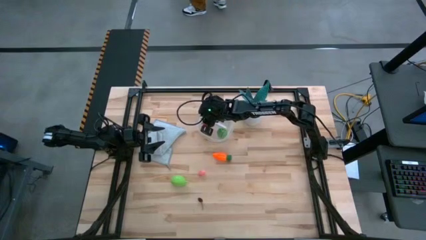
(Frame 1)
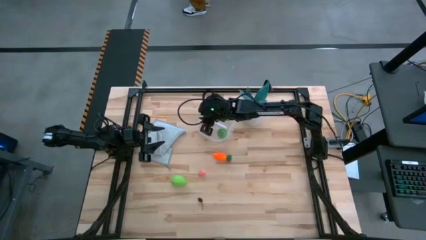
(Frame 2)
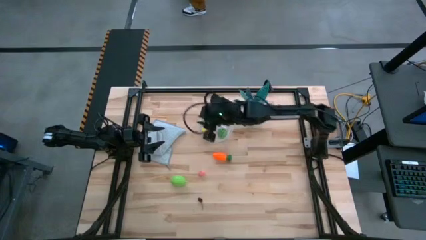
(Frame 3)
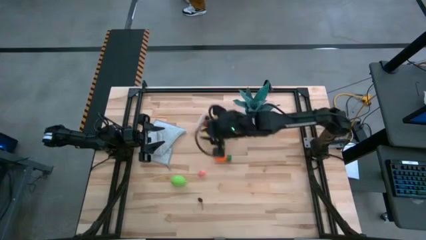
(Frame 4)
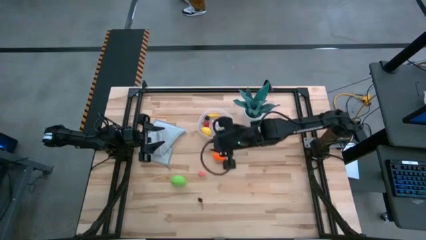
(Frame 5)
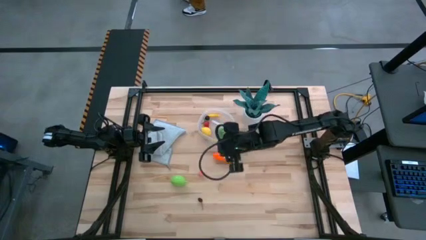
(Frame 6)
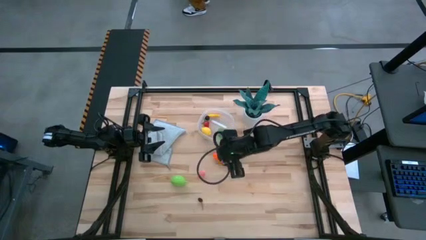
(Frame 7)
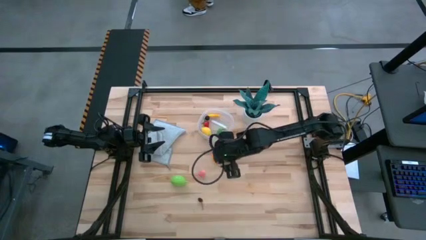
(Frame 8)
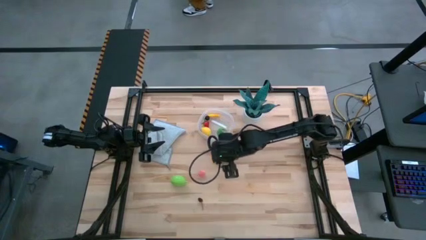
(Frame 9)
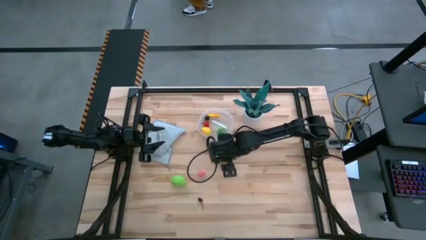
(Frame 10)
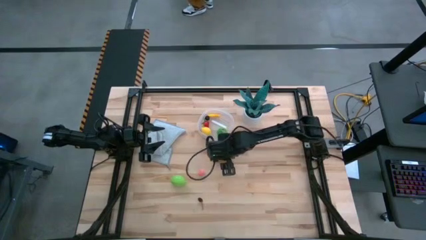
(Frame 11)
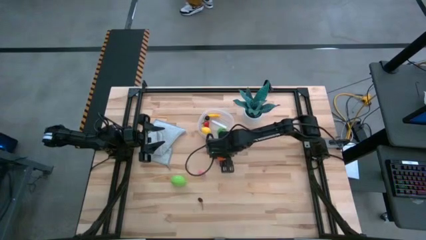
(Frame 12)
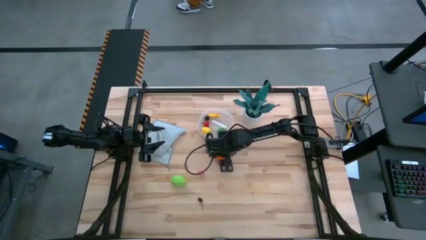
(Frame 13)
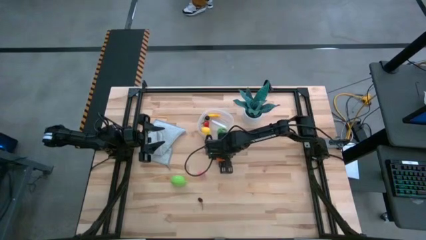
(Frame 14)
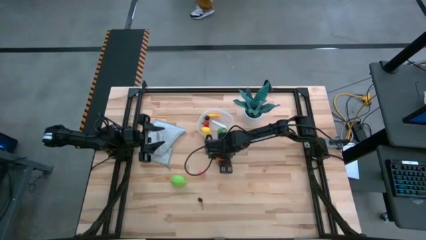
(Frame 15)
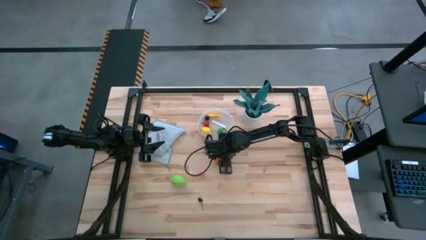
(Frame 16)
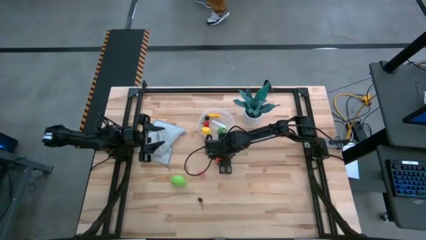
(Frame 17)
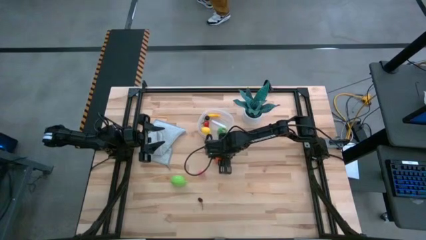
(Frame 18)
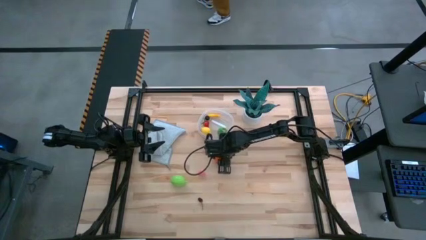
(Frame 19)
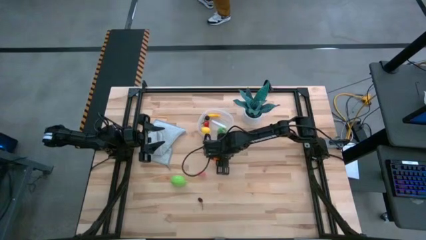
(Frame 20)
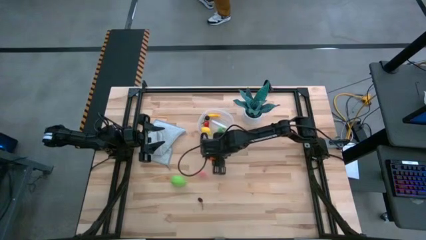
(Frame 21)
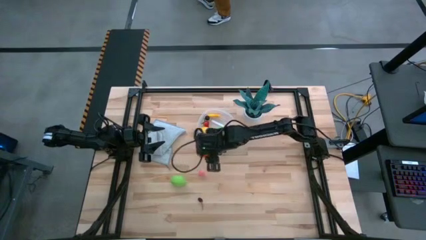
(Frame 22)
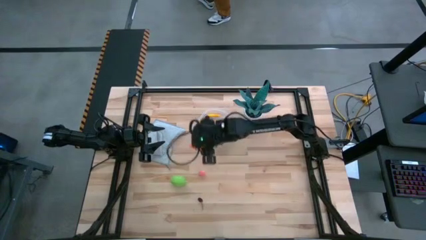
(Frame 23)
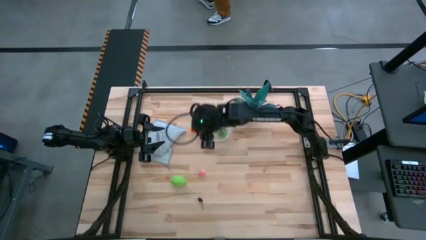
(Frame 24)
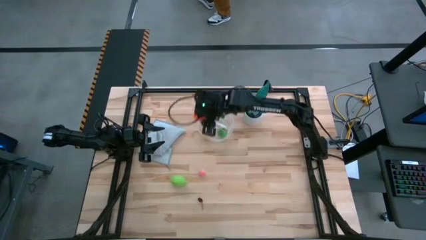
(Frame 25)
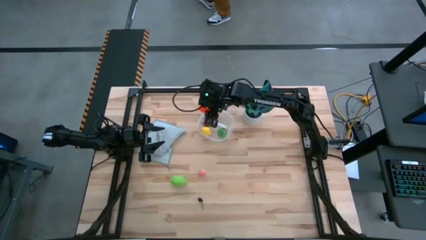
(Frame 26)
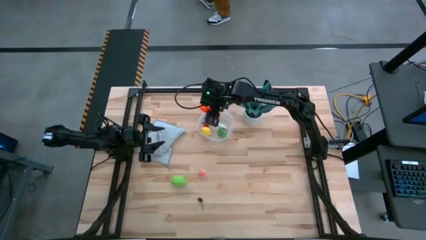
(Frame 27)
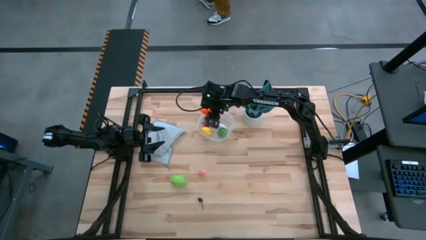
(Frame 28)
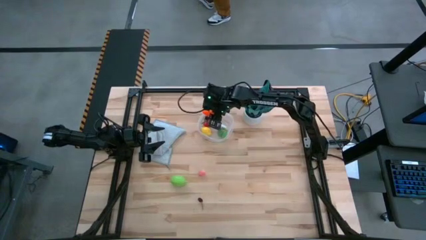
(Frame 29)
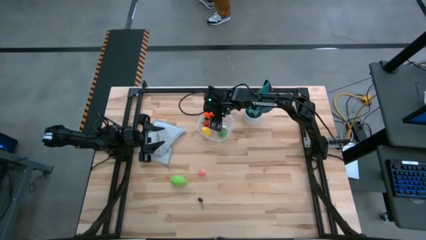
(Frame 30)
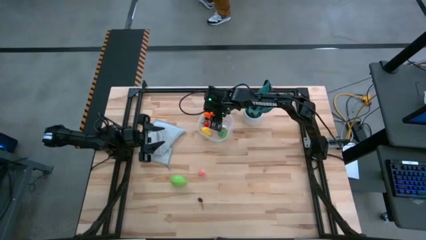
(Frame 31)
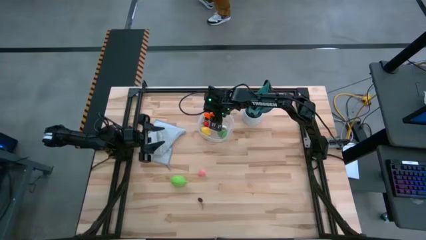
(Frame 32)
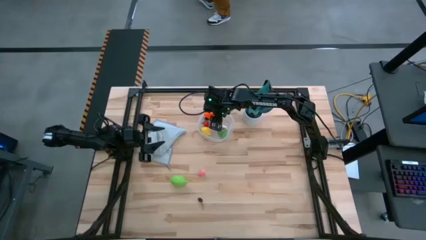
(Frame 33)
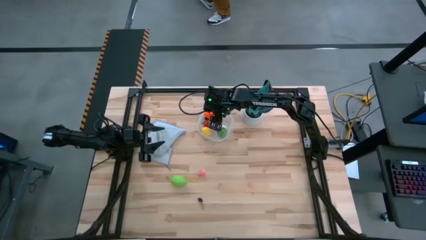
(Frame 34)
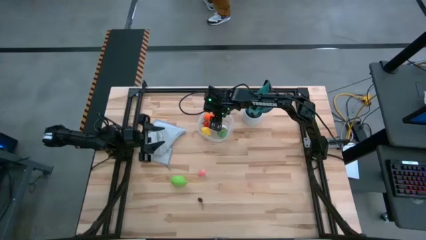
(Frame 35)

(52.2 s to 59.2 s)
Task: Pick and placing Produce into tupperware
Put the carrot into the transparent container

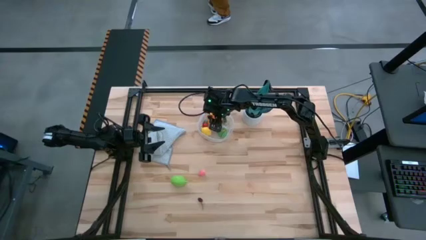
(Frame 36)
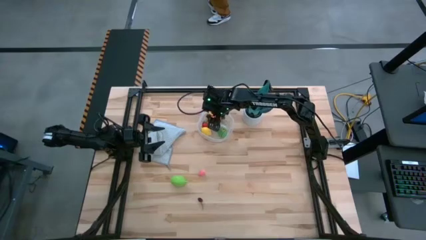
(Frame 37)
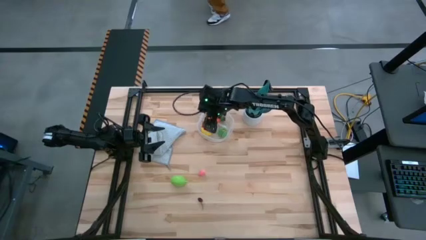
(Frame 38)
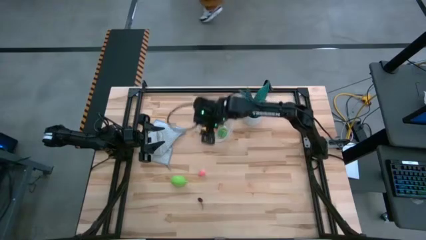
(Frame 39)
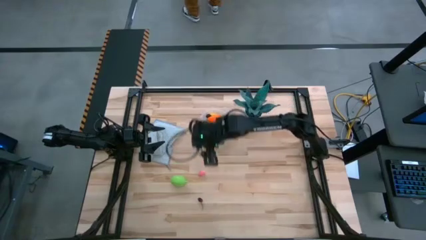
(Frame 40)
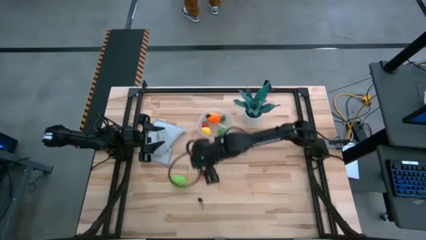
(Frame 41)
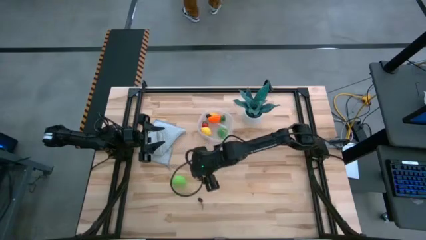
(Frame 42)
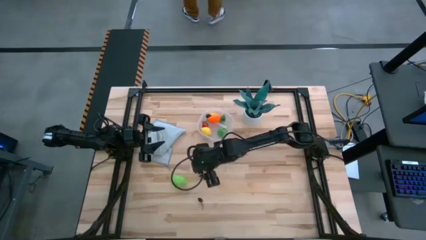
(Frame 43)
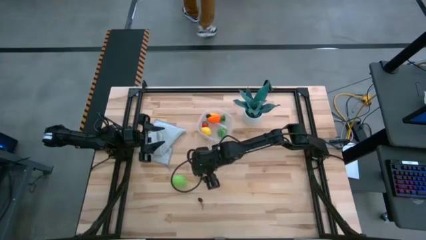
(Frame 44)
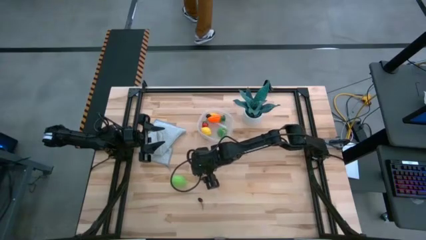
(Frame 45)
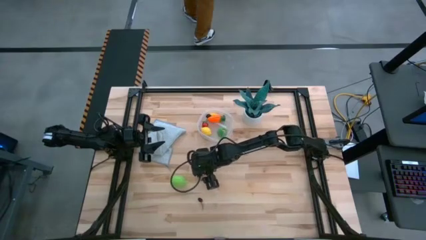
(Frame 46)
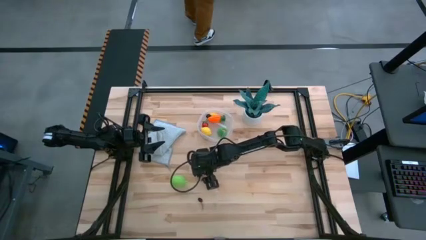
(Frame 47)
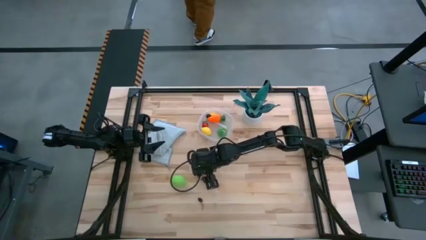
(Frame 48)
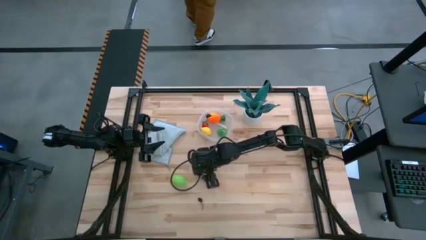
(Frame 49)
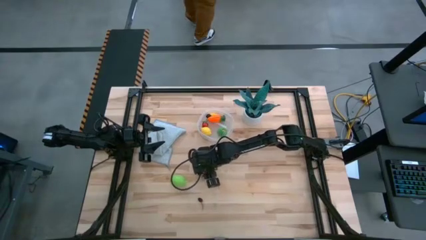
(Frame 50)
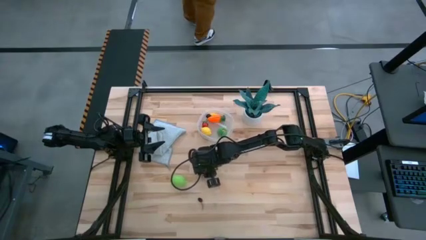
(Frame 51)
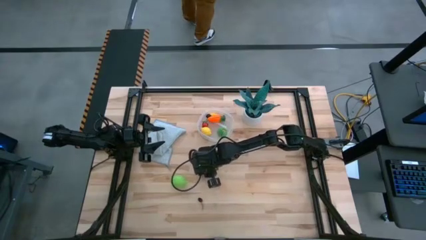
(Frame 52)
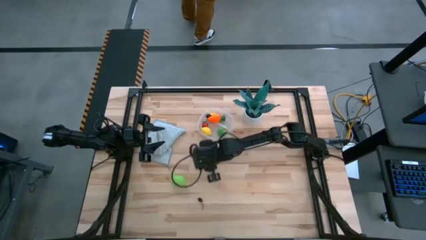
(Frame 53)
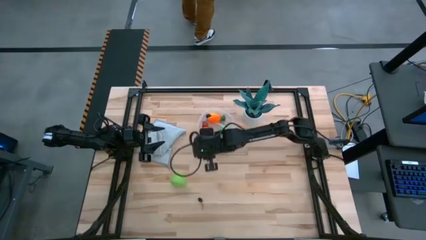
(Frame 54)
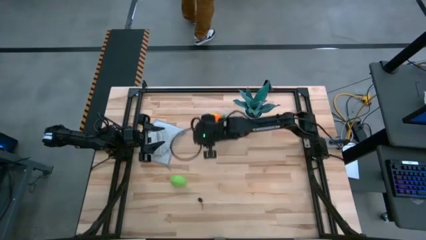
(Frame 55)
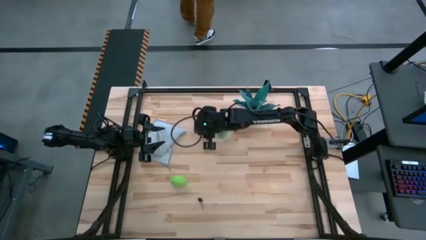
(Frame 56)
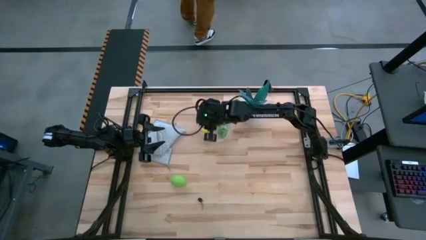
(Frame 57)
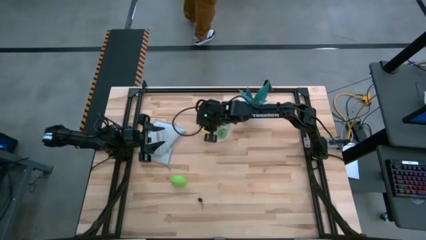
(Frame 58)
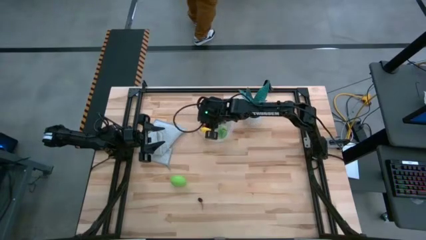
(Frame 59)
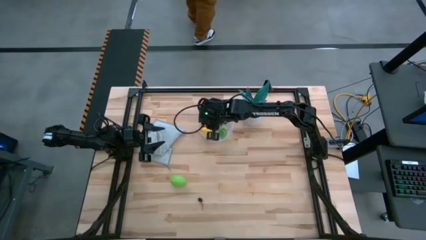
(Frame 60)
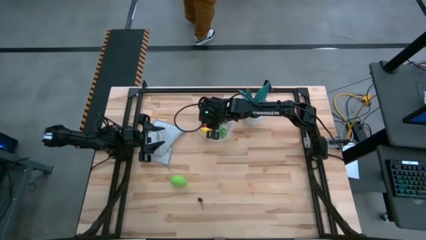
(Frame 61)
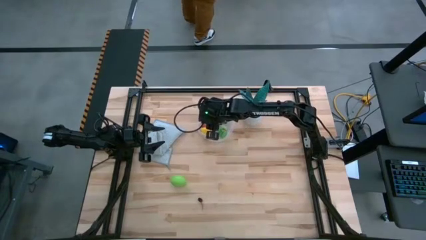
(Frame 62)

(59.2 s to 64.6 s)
Put the peach into the transparent container

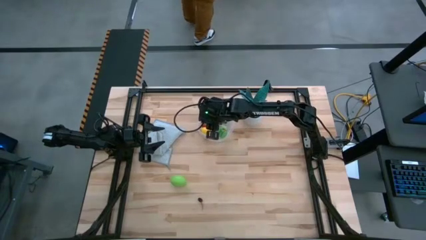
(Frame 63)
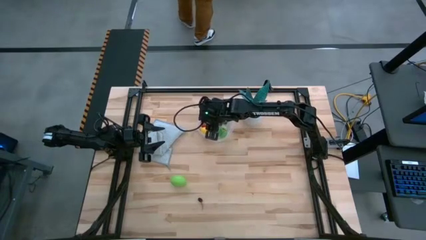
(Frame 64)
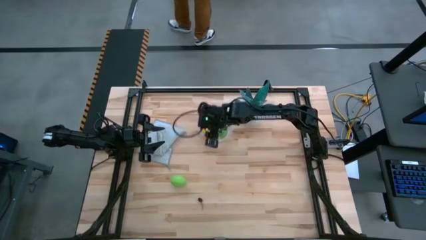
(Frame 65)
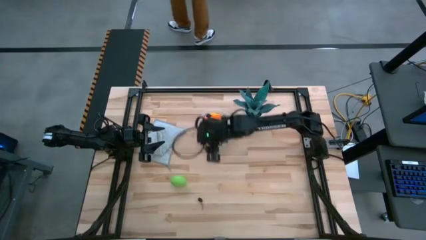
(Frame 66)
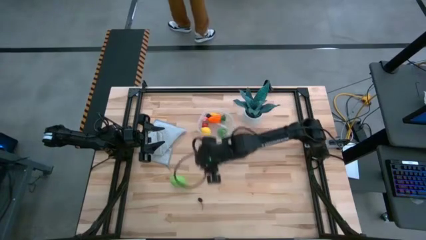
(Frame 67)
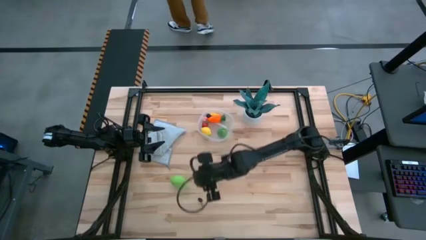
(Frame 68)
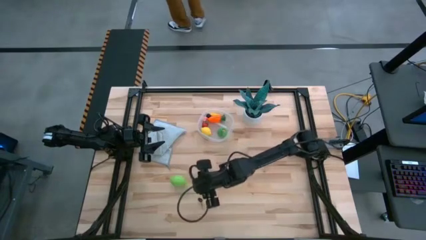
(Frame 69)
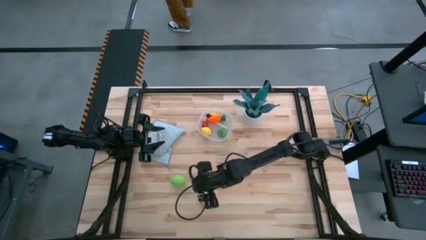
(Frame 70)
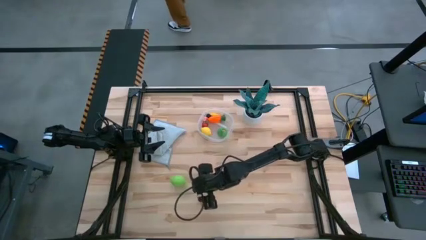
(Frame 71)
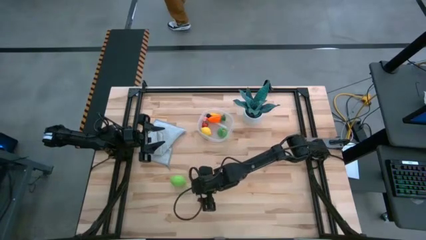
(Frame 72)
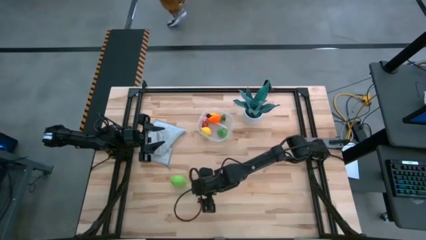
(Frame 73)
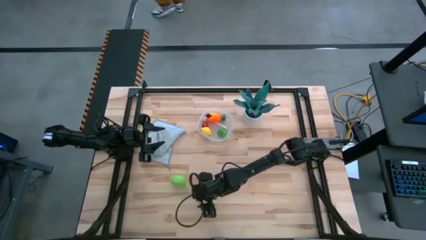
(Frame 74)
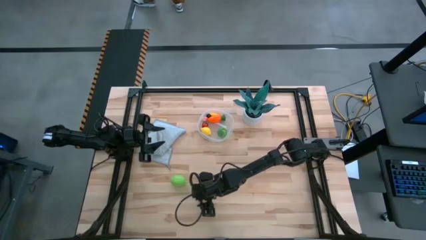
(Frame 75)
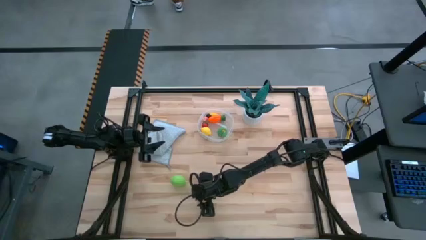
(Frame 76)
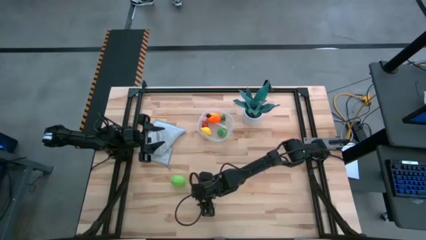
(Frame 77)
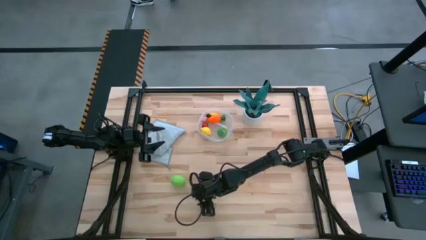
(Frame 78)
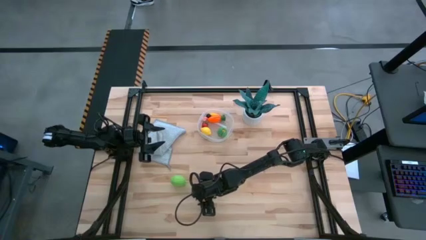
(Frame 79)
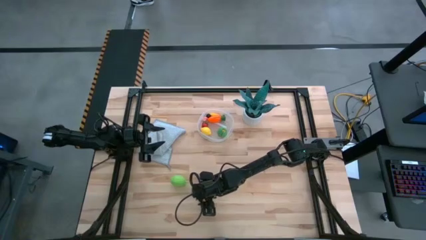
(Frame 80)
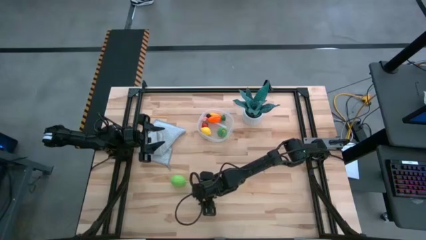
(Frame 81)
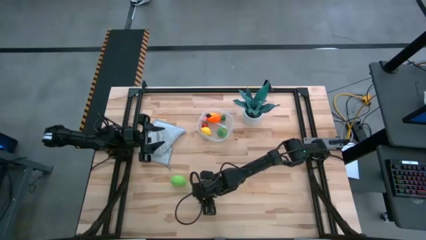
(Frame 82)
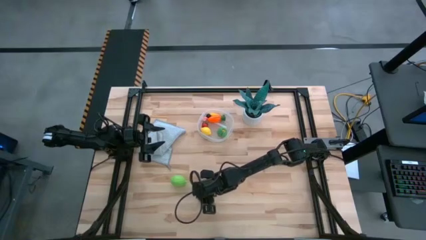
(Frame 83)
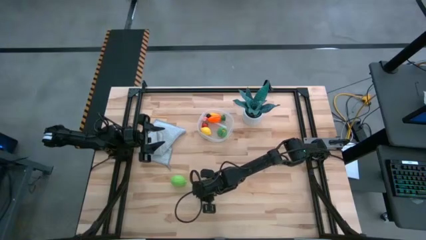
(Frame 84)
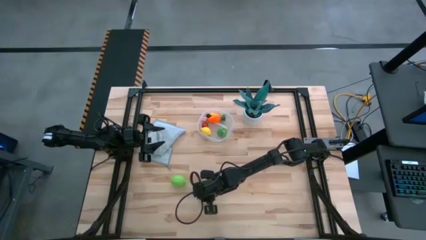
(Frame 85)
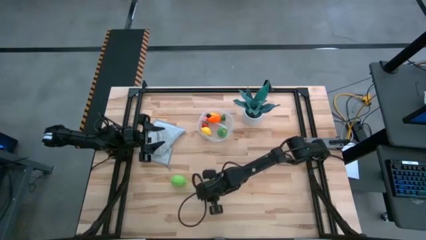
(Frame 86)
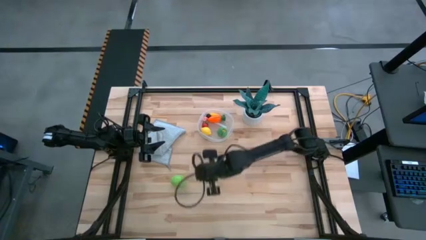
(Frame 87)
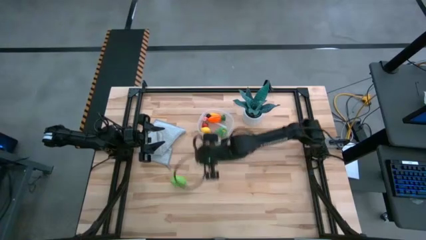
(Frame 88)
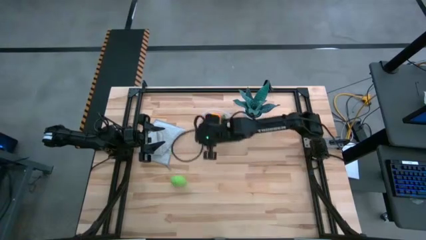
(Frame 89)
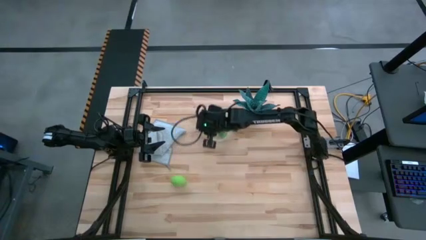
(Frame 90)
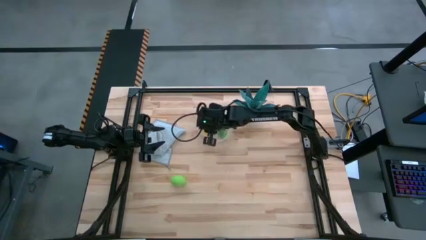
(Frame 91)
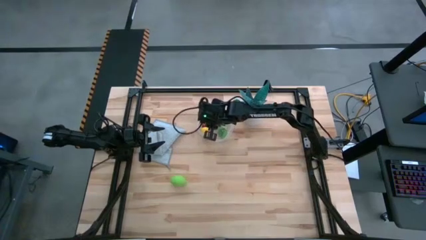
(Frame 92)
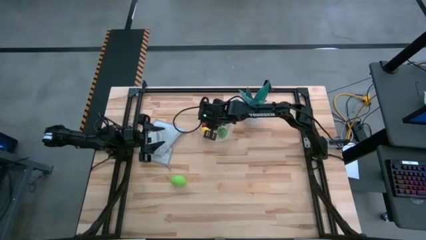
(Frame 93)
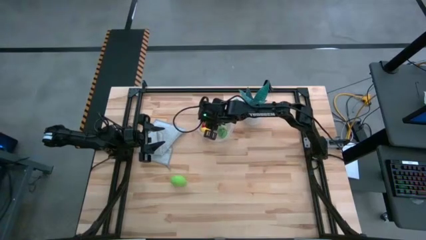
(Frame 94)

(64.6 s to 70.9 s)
Put the red cherry into the transparent container
